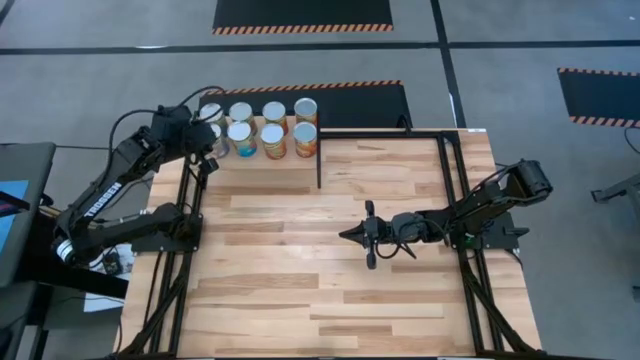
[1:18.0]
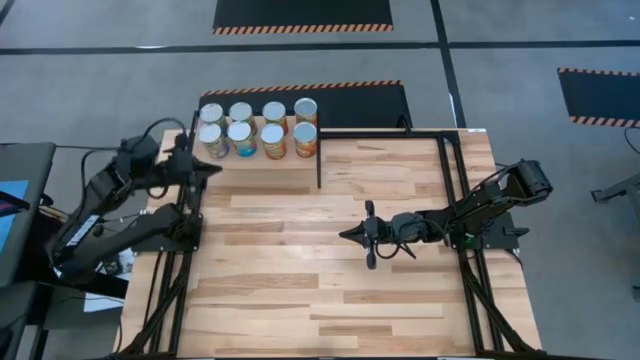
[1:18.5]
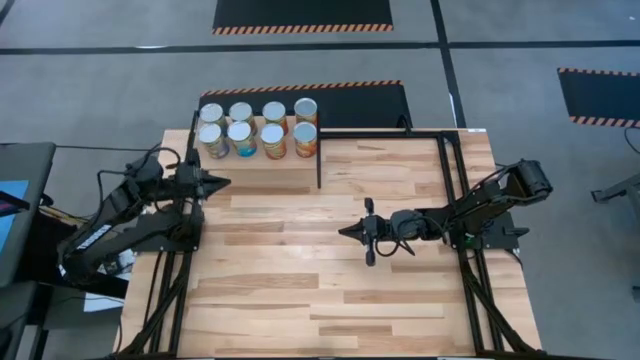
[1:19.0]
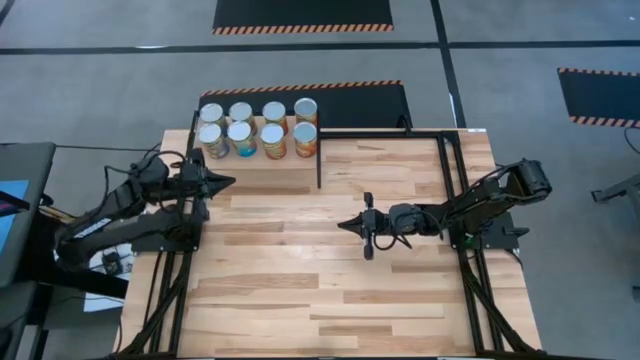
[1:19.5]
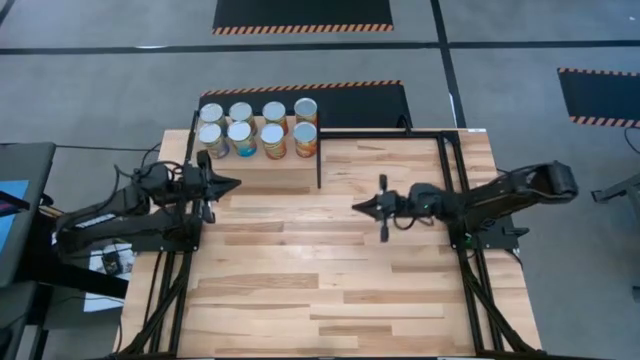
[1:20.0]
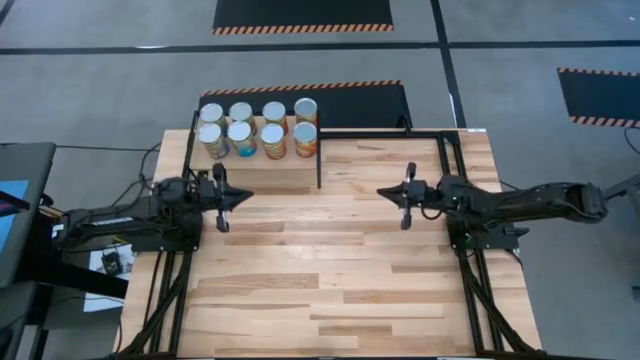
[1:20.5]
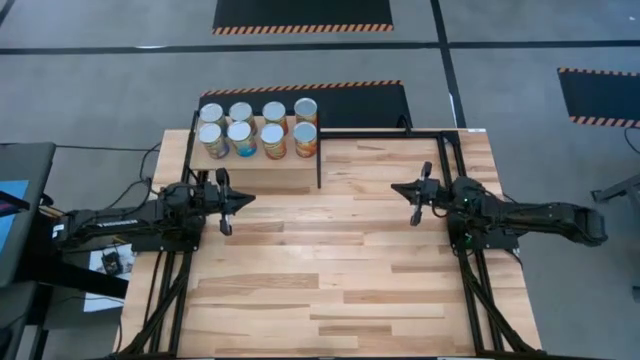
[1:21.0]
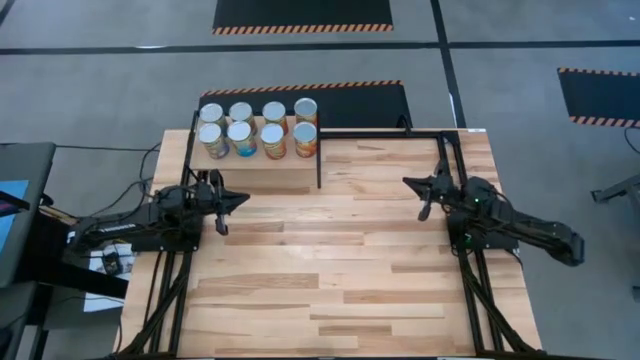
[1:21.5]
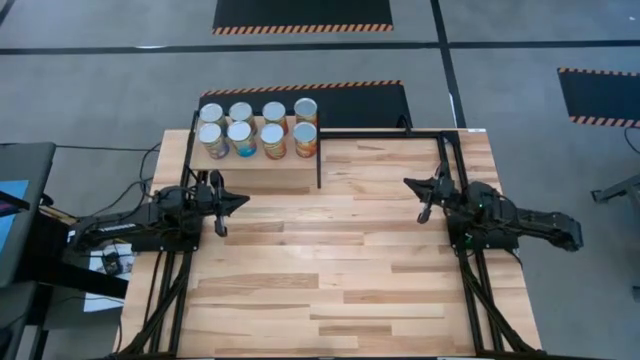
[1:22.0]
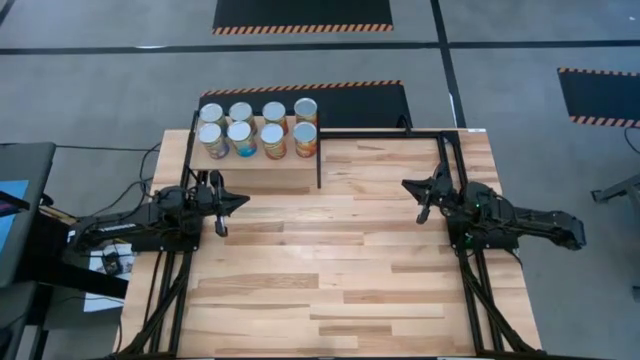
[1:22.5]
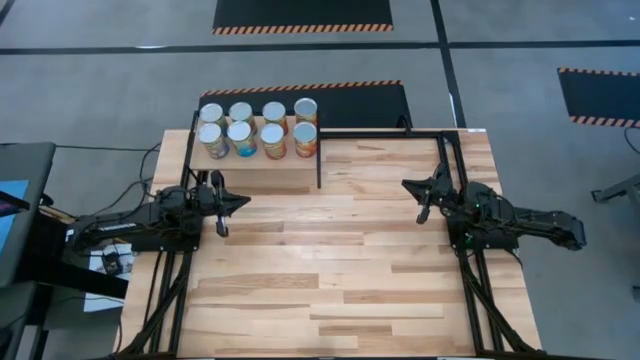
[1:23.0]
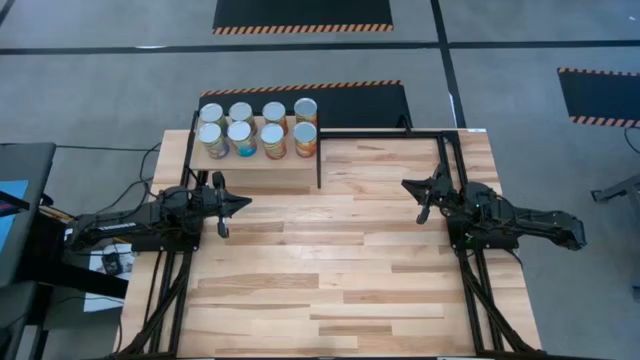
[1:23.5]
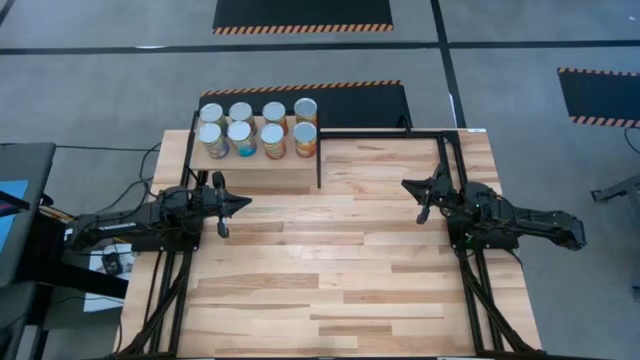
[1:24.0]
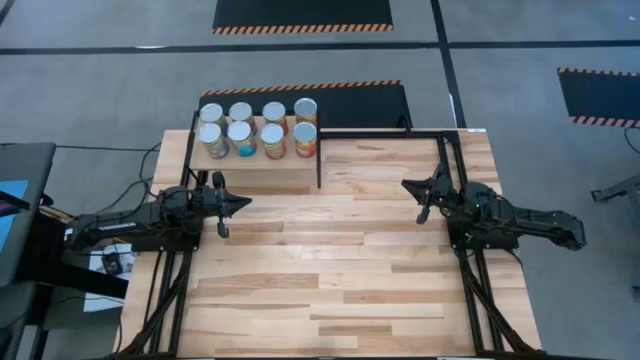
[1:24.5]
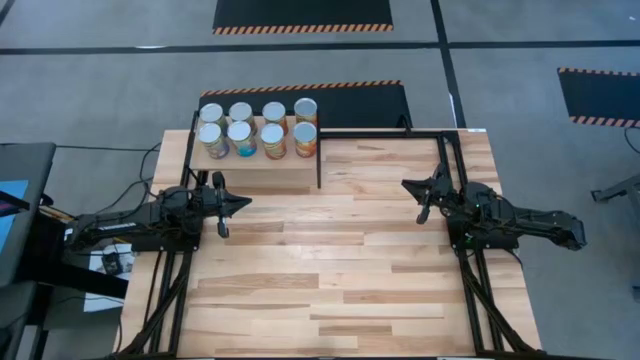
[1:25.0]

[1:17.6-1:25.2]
Task: Pick and place cans onto a shelf
Return to Home Position

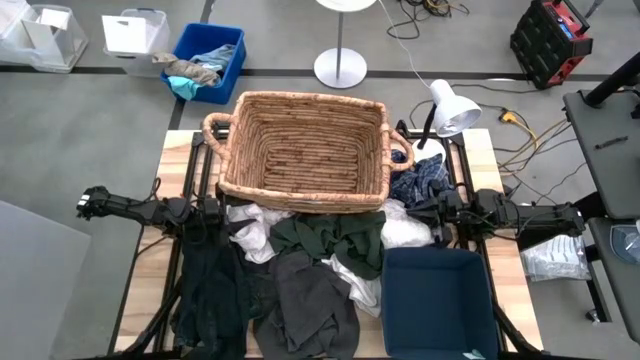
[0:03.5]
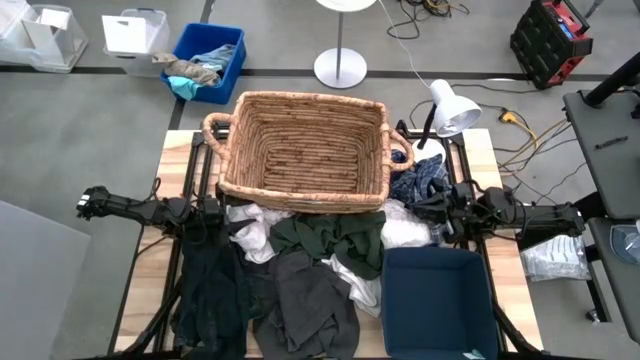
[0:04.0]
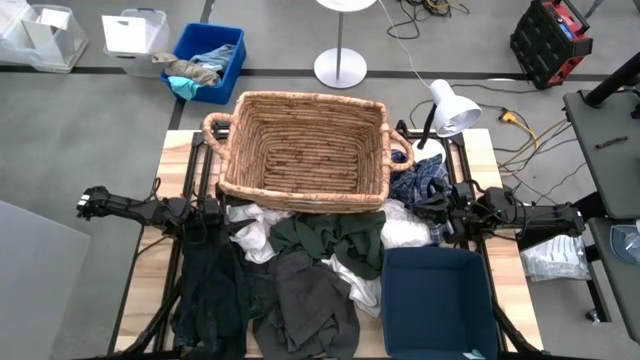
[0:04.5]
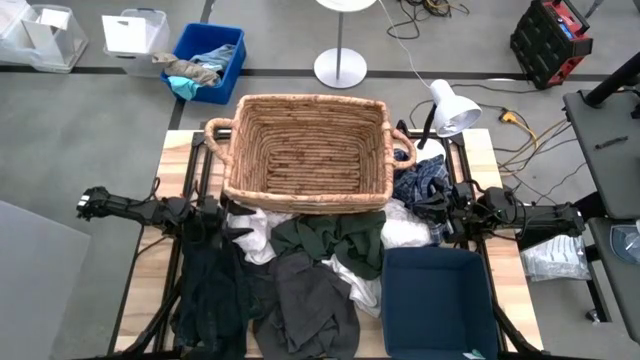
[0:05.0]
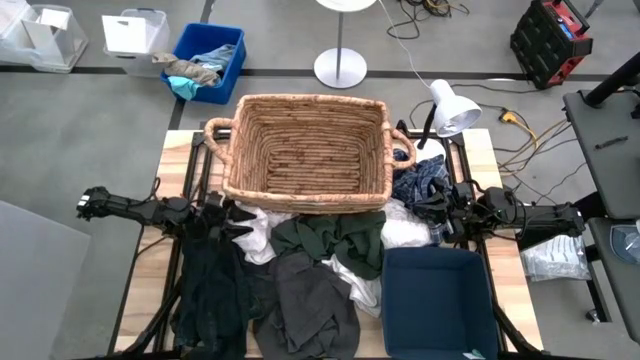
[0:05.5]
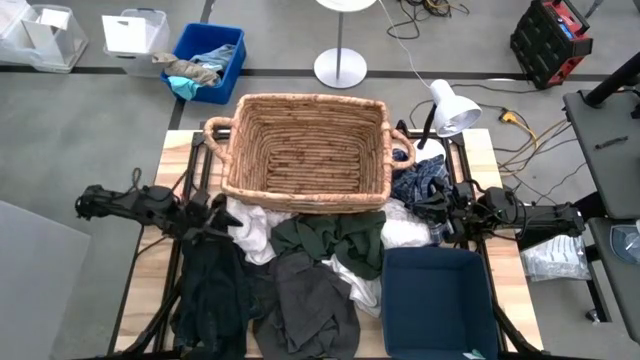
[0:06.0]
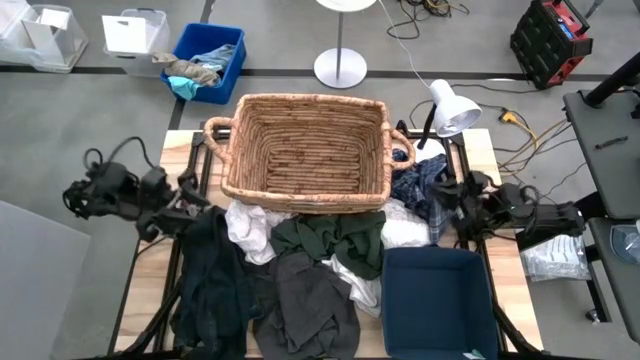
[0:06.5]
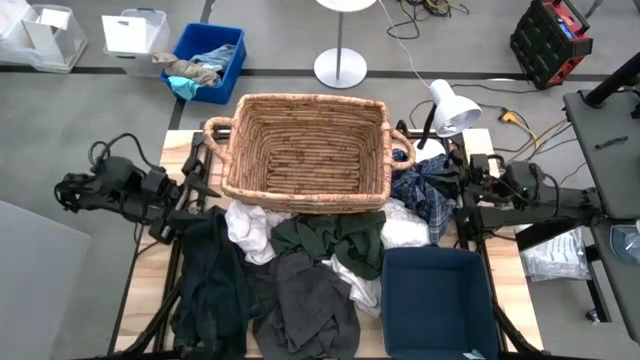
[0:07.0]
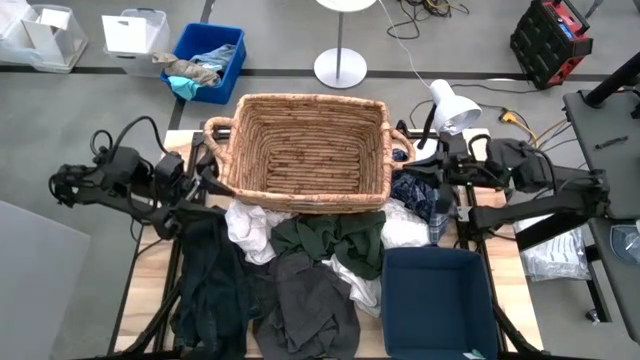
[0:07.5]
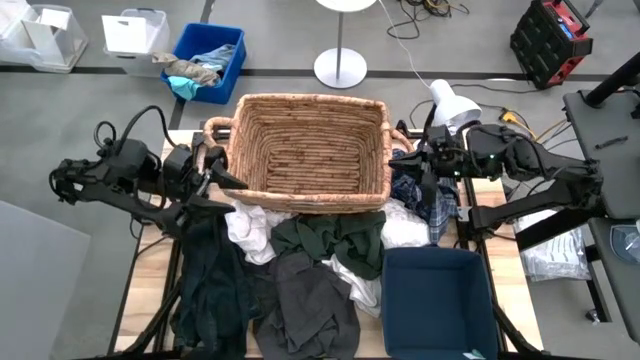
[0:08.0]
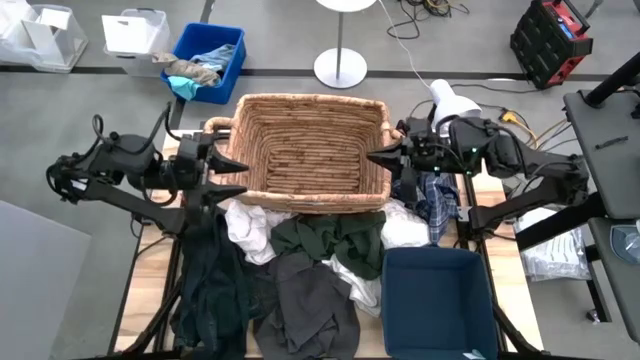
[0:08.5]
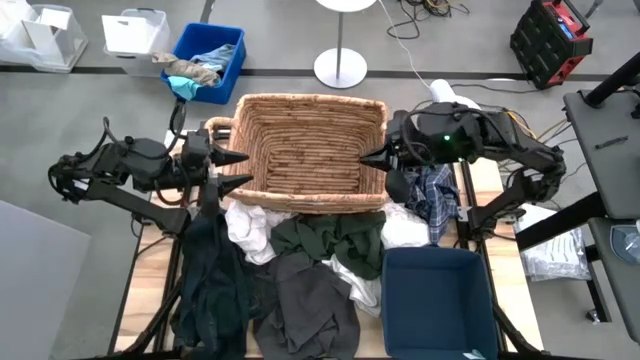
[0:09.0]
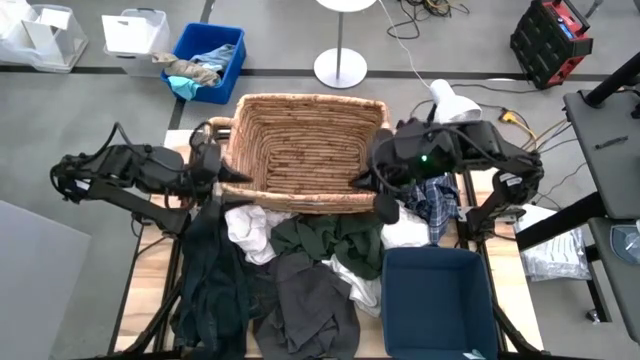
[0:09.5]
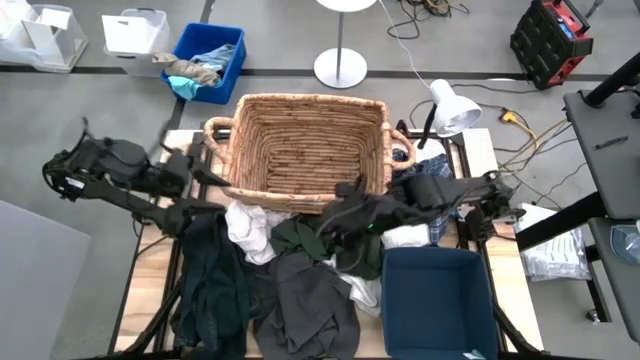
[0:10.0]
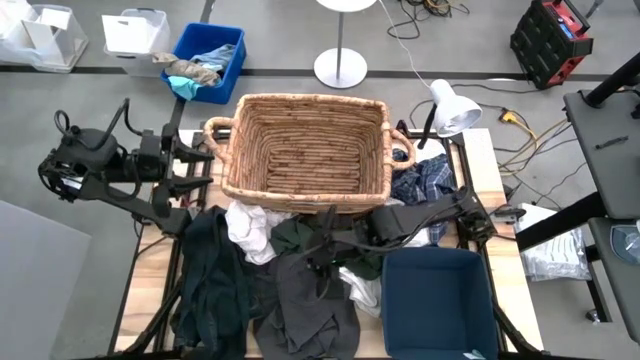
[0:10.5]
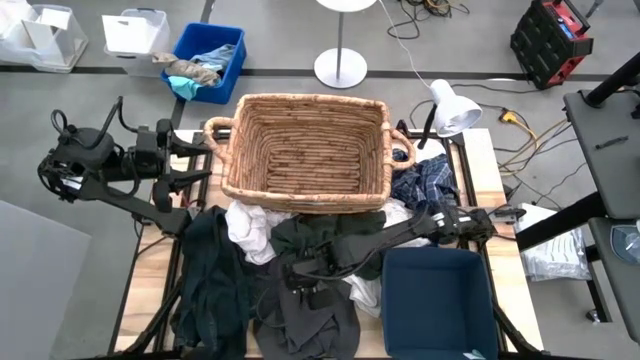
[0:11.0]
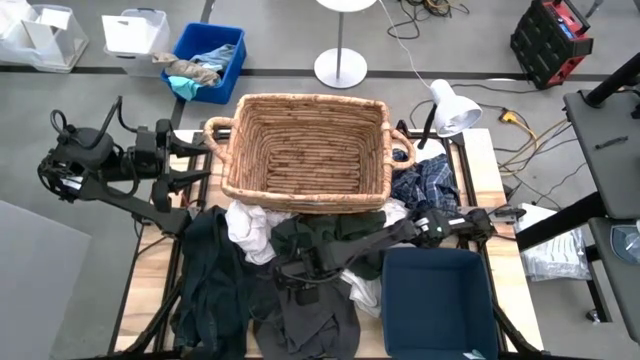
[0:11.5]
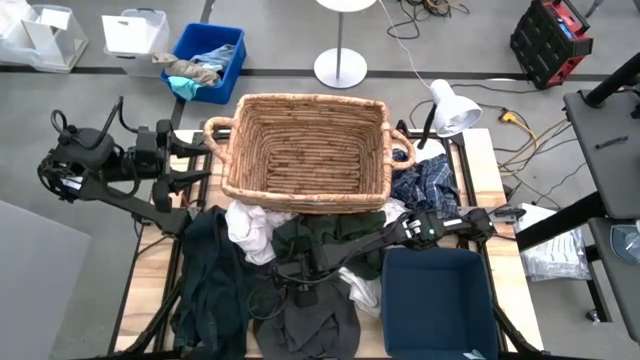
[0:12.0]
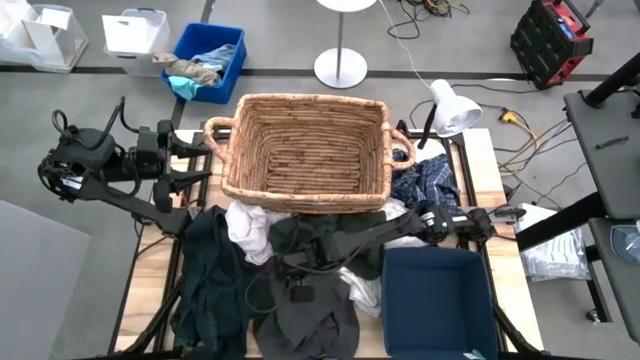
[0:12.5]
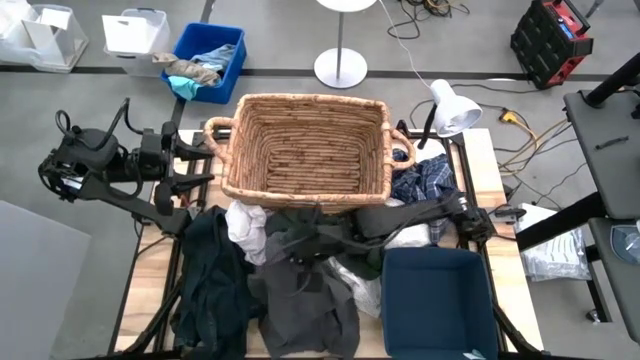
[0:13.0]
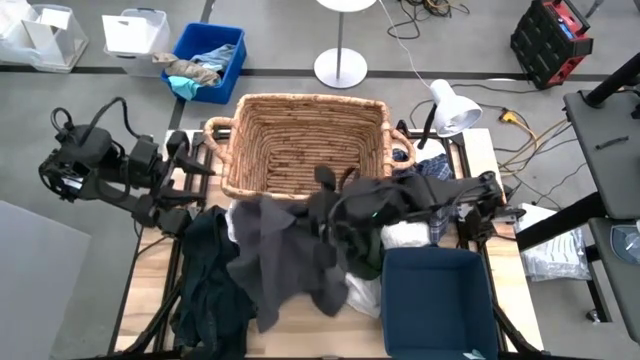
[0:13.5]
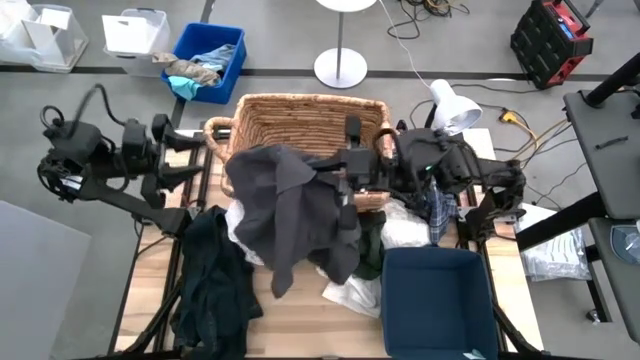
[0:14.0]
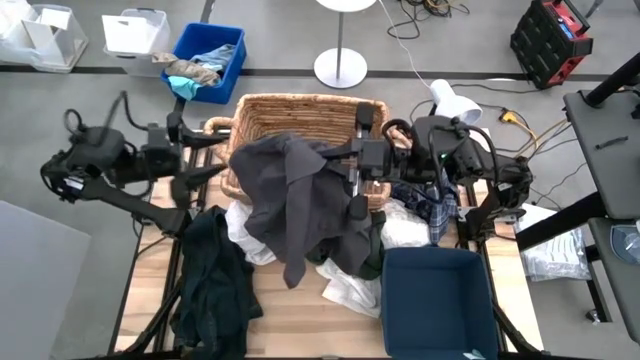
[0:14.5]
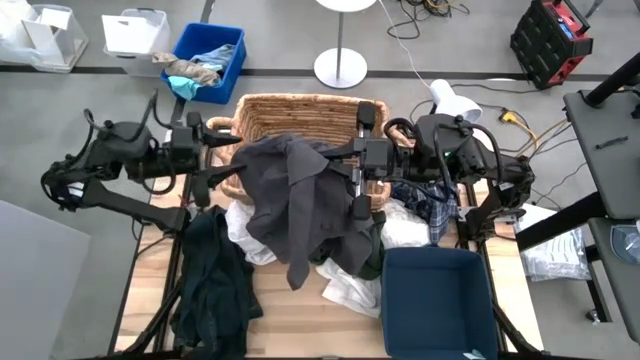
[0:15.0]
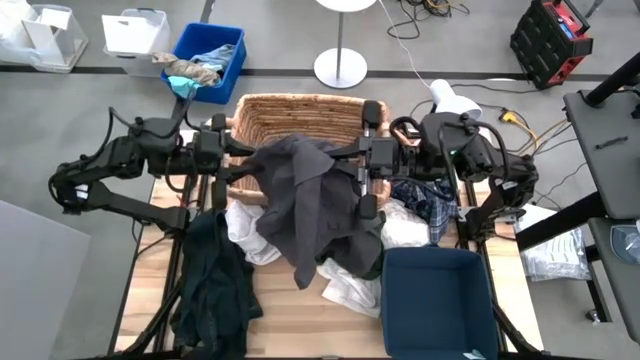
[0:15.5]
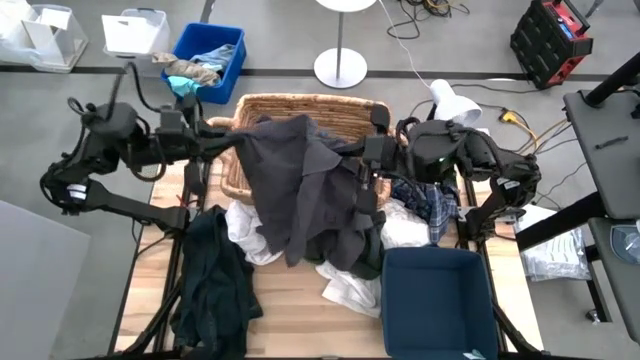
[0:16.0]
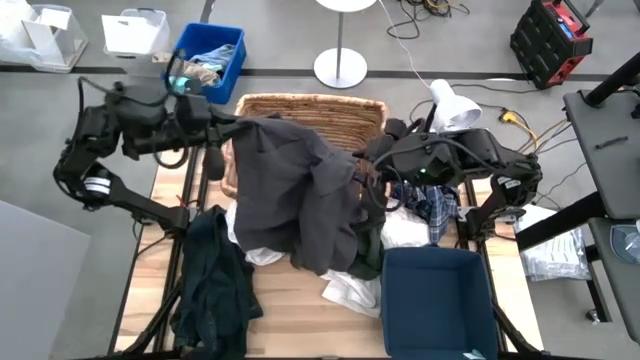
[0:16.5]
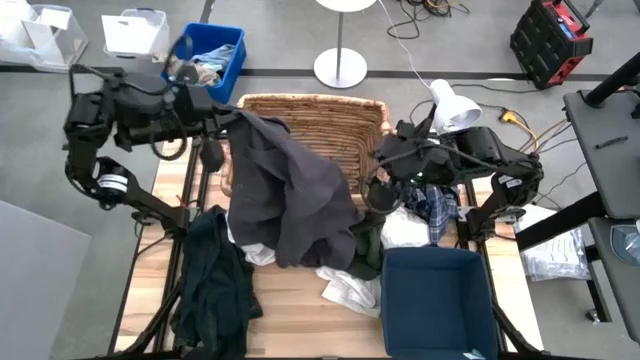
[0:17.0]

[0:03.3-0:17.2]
Task: Sort clothes
Put the dark gray pants into the brown laundry basket
